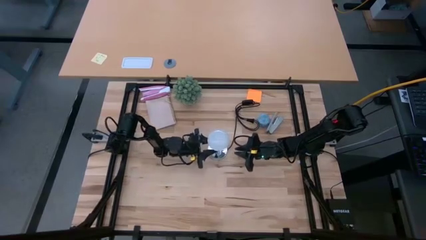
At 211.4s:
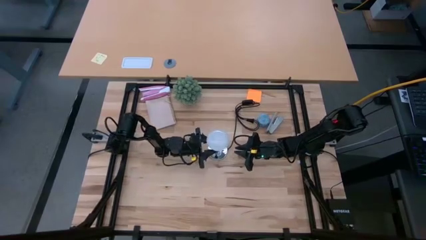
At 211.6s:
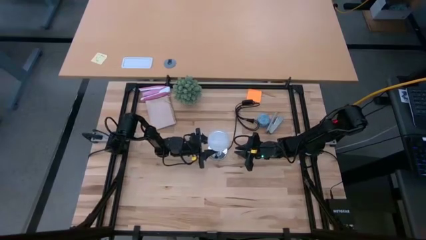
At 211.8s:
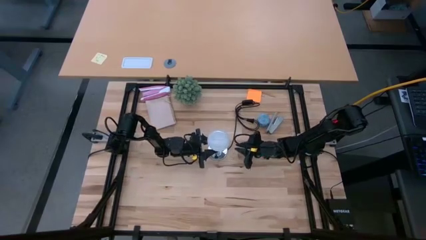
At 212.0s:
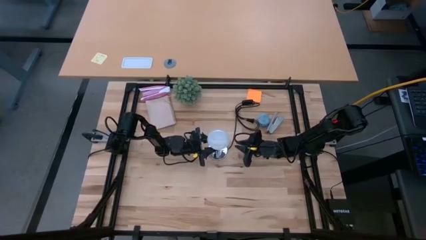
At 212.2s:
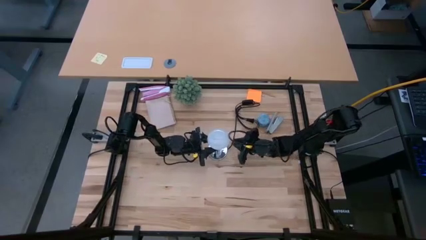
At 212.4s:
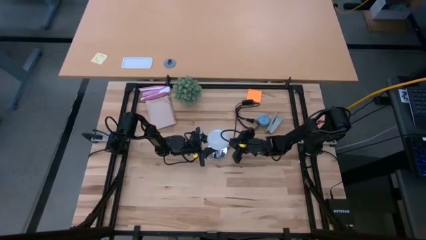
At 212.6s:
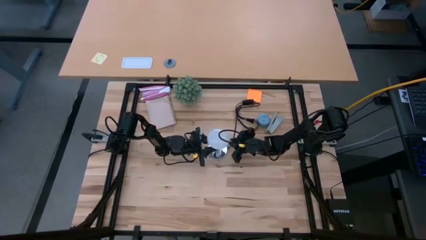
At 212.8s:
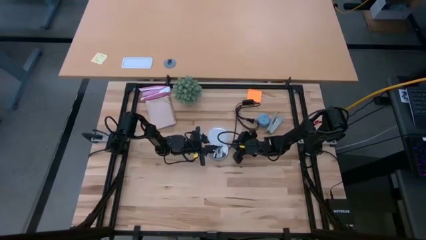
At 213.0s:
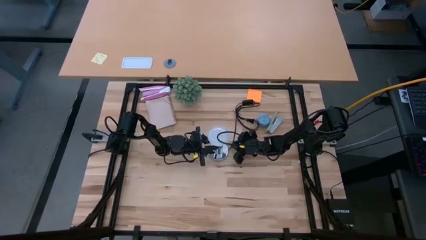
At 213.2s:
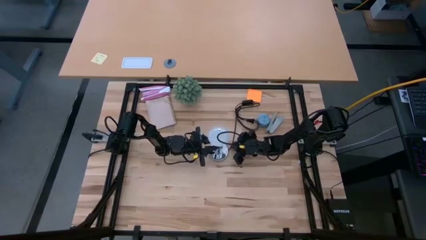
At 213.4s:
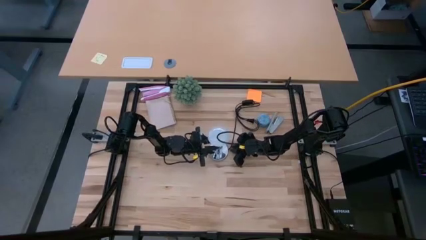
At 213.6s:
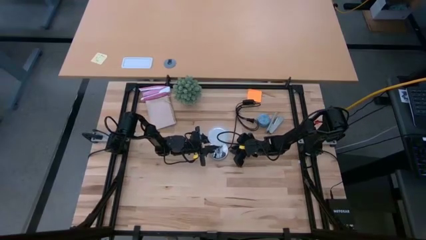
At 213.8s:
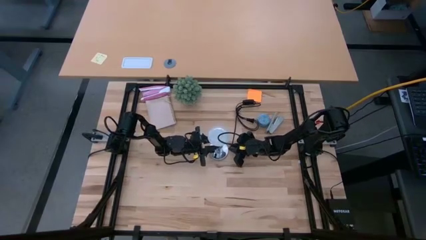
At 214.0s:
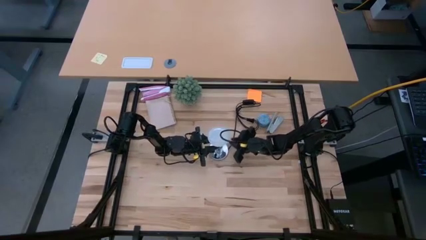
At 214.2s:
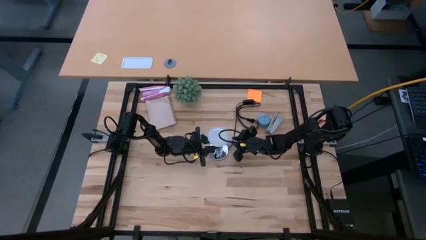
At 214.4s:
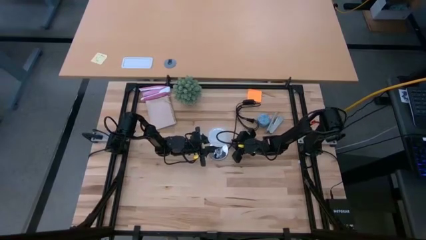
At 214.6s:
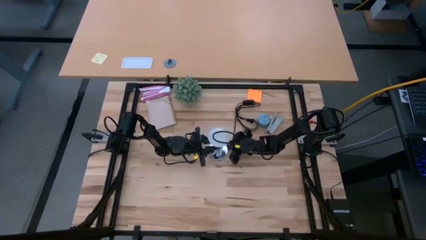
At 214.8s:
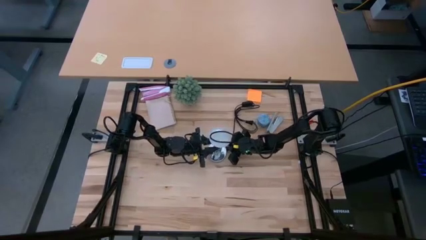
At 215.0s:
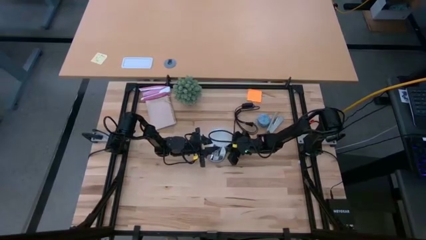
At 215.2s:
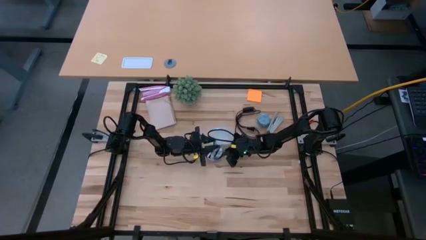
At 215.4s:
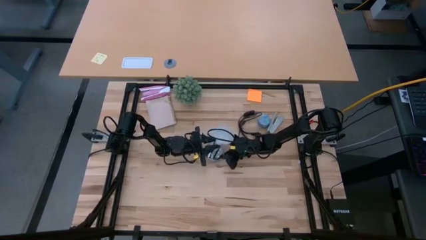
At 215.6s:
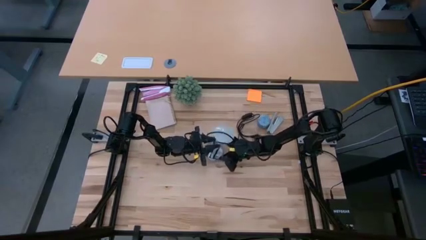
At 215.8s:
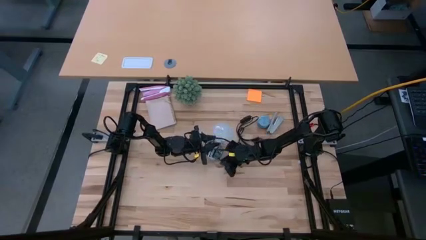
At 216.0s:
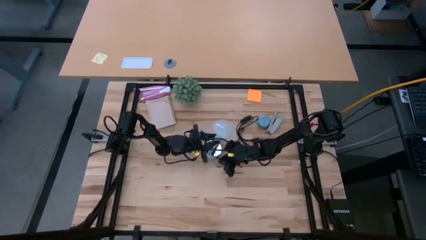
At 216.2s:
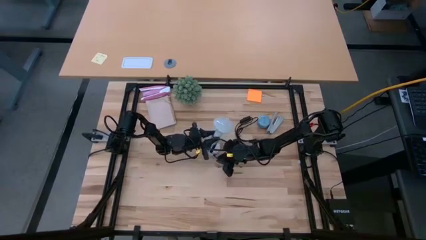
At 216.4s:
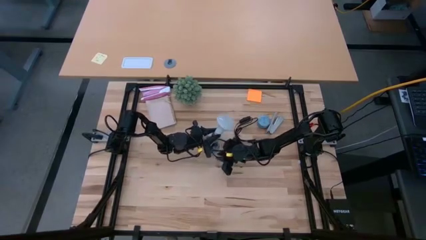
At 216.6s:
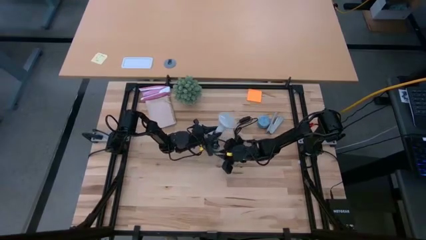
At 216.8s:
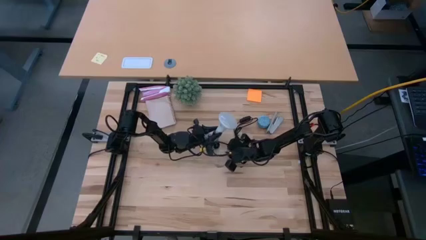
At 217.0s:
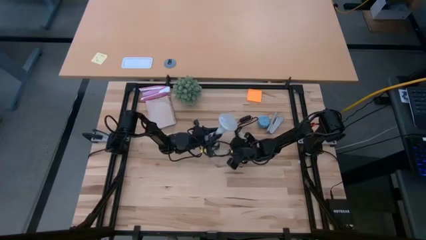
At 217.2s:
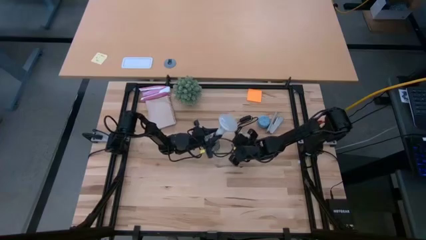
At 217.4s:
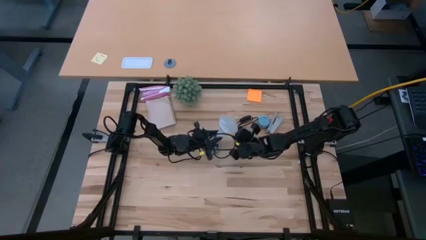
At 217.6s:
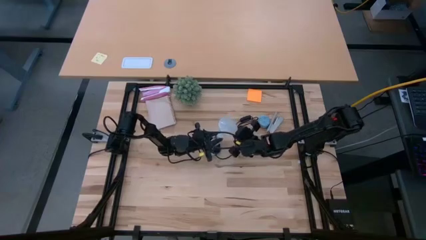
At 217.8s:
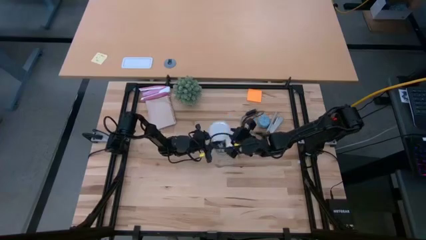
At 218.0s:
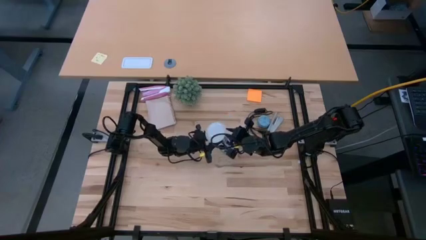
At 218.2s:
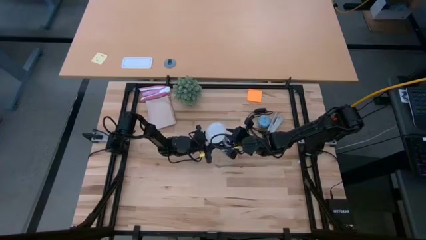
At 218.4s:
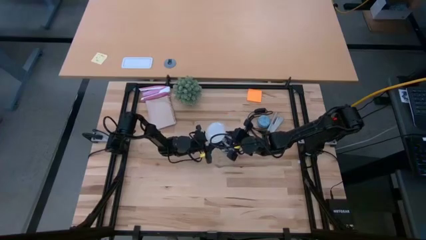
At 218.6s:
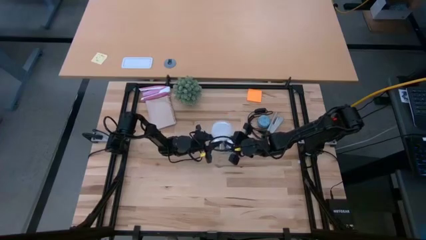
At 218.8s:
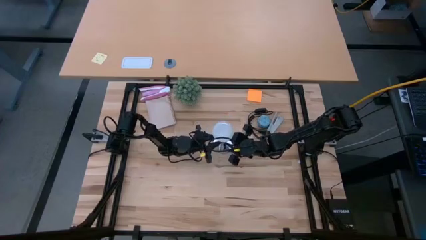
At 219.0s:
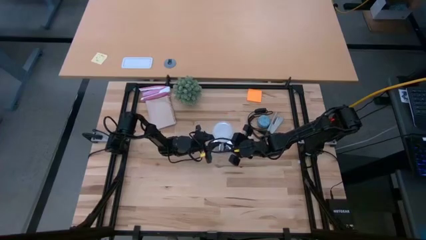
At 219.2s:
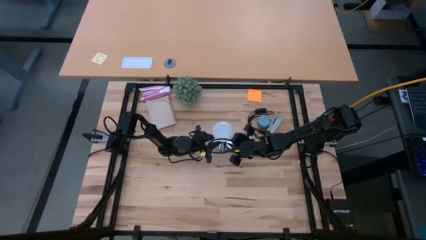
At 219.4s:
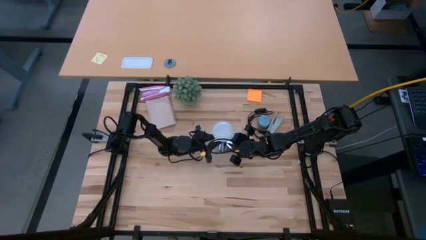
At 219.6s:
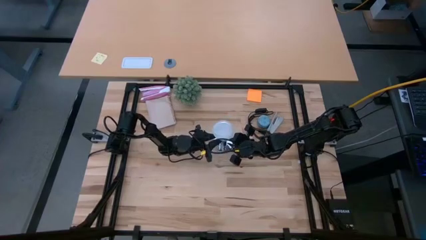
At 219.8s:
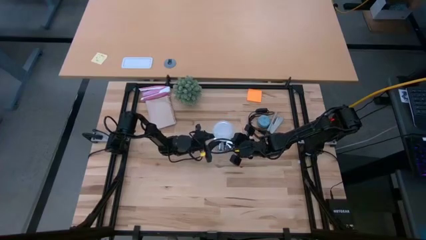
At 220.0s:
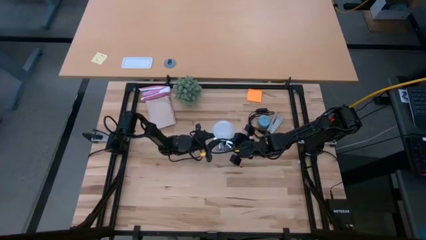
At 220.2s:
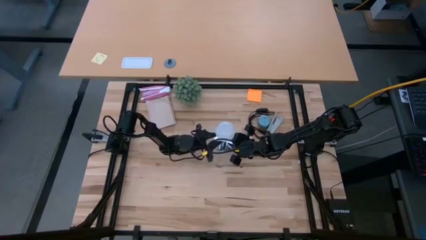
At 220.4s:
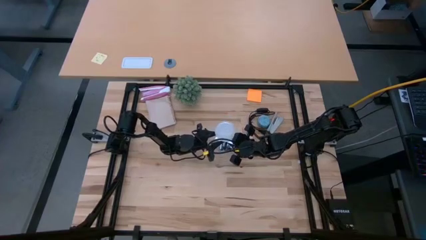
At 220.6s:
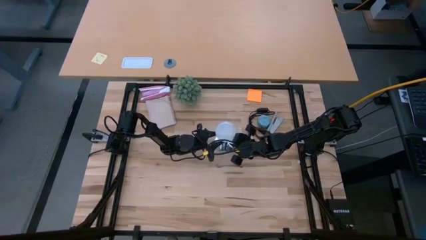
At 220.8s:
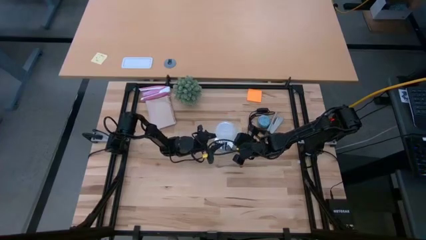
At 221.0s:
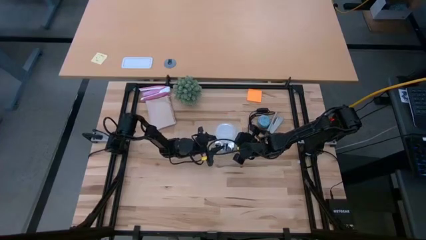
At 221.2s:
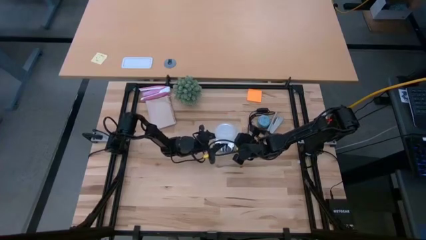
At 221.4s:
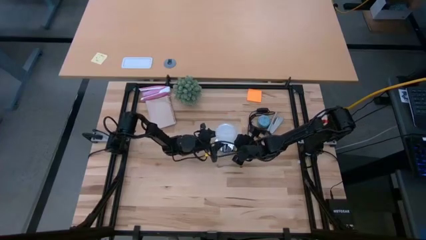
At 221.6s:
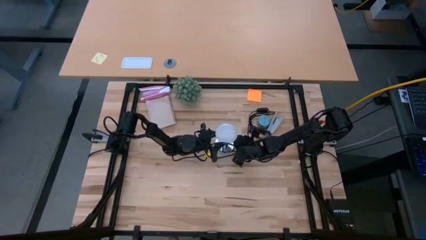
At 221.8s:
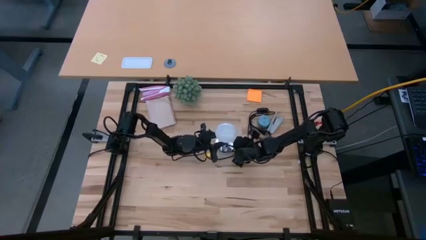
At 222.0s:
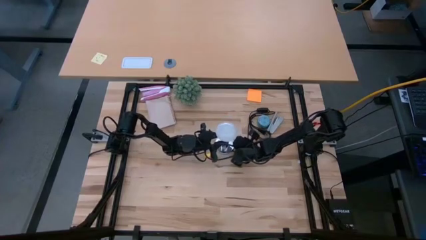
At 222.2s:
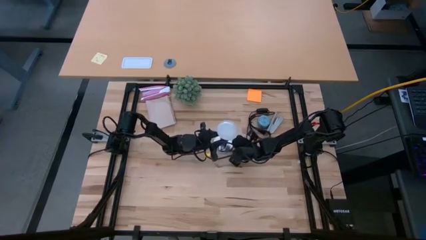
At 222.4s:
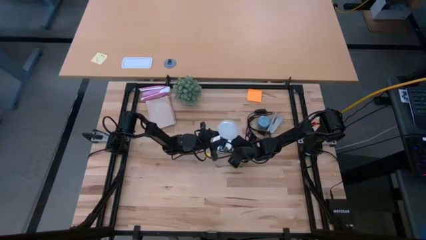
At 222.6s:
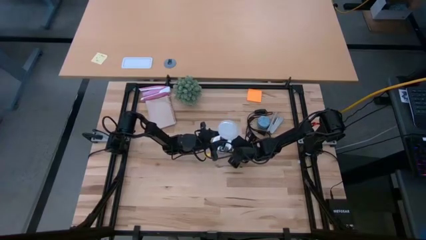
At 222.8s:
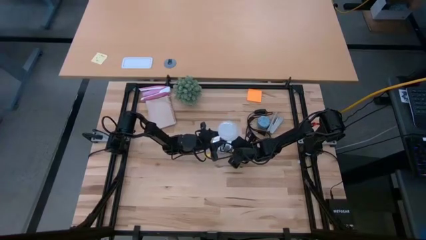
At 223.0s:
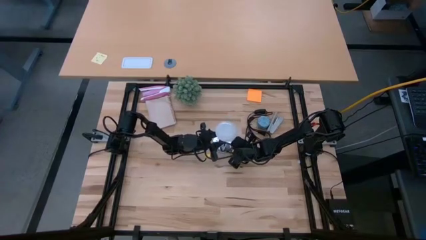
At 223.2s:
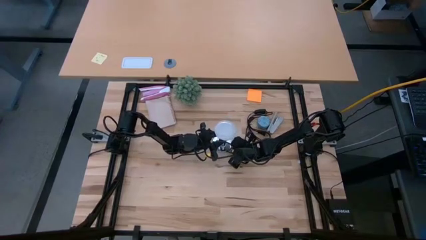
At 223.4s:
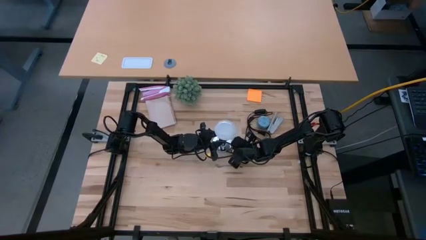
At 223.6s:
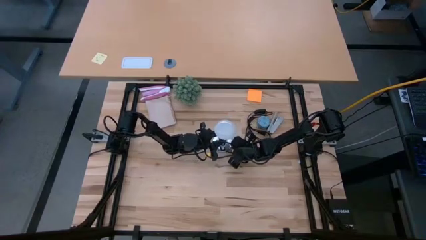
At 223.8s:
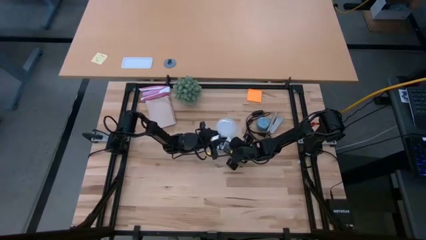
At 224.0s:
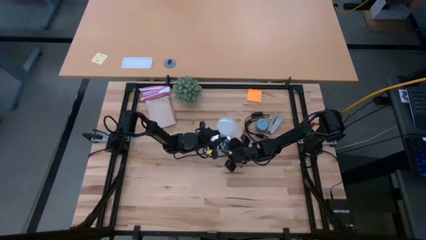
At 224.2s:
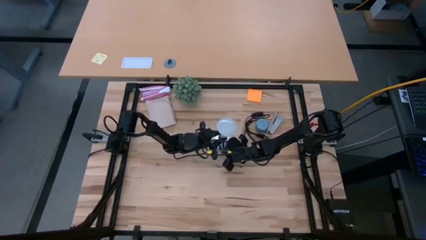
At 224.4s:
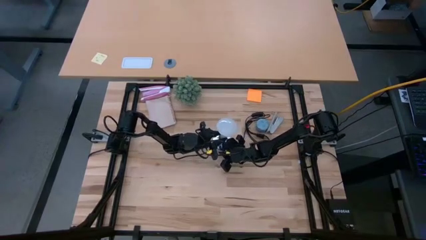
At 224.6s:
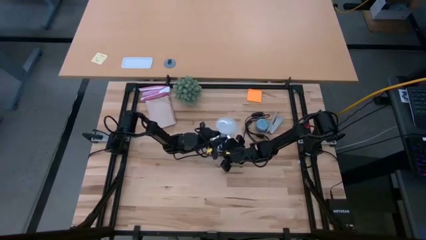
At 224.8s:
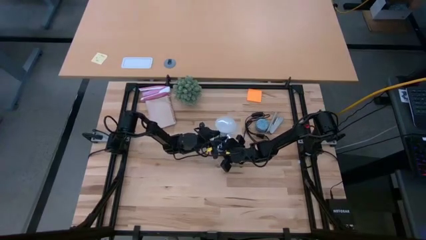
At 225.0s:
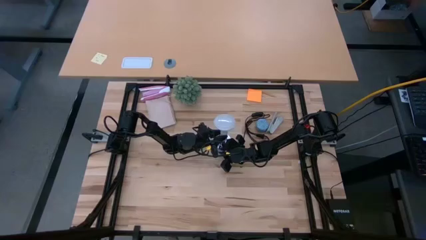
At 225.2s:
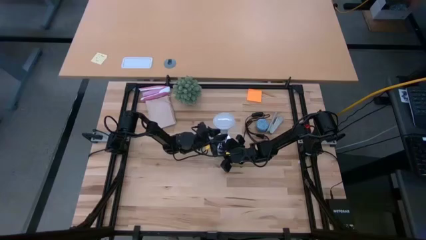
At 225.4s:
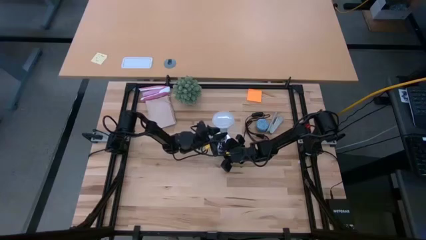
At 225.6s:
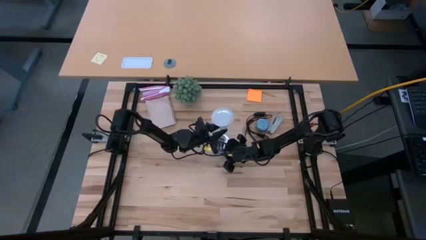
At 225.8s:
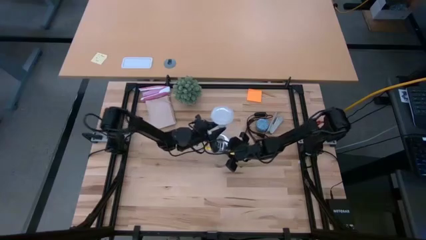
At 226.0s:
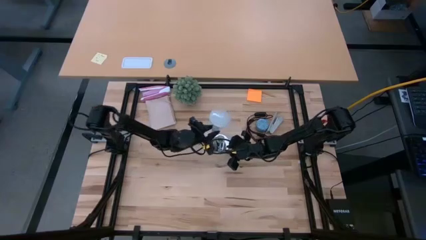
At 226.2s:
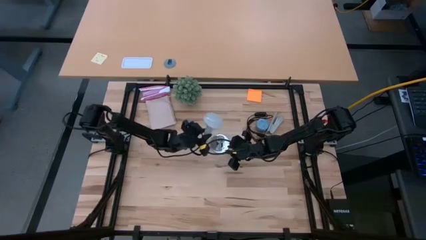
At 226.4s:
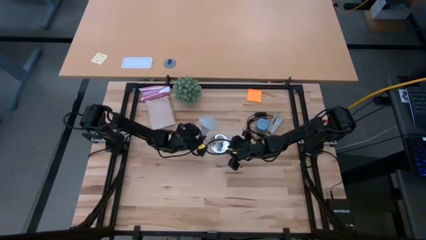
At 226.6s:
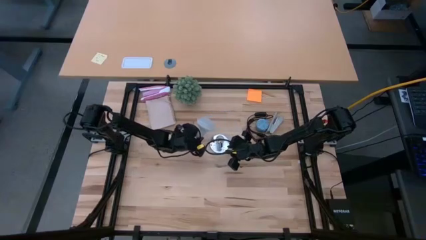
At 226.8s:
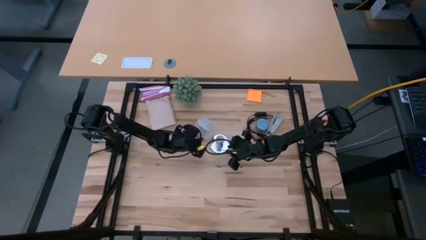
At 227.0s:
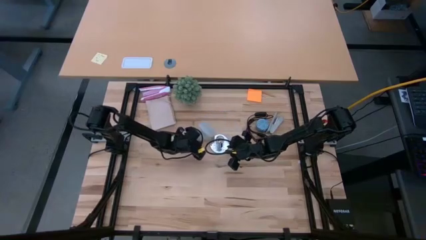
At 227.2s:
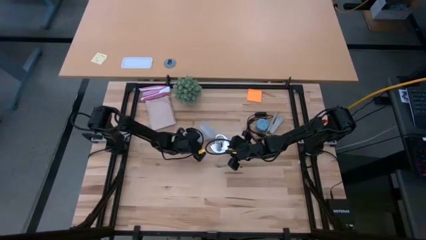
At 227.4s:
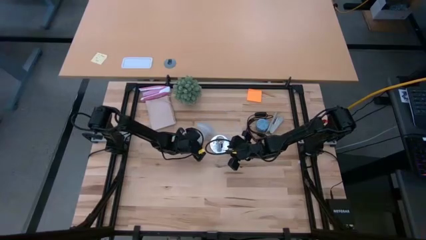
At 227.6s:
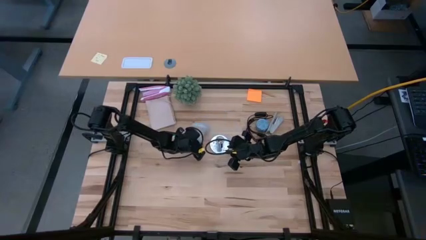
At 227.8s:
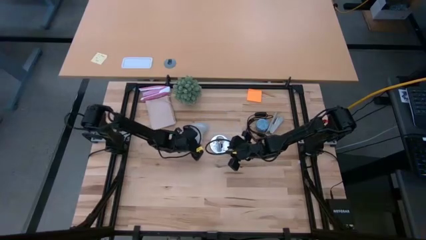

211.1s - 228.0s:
Task: Screw lightbulb
Remove the white lightbulb from the silver lamp
